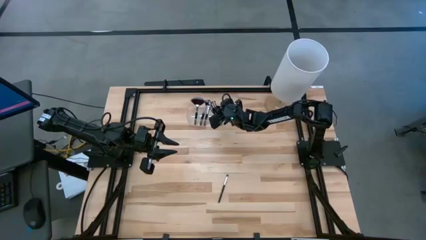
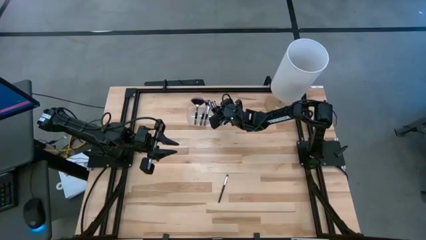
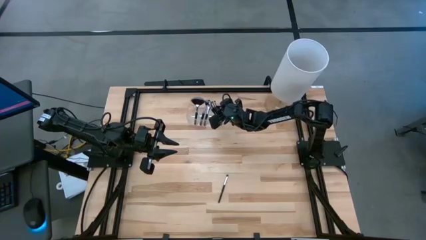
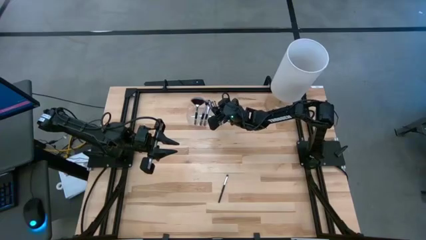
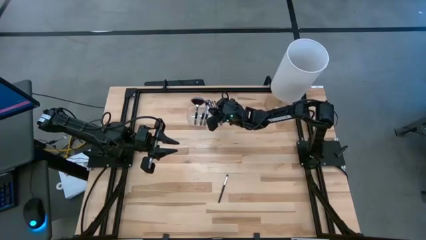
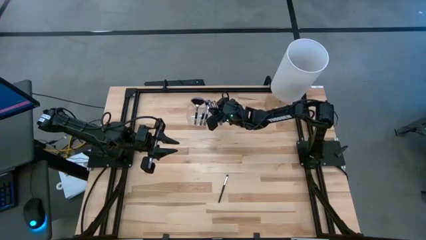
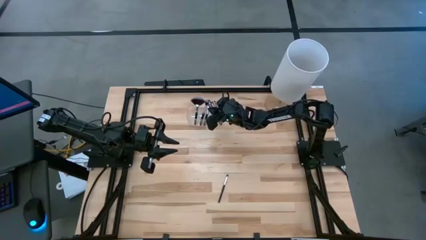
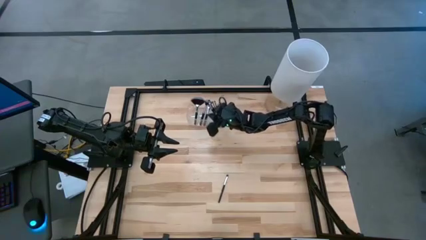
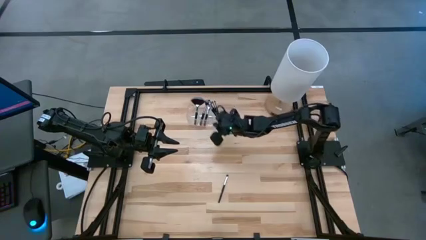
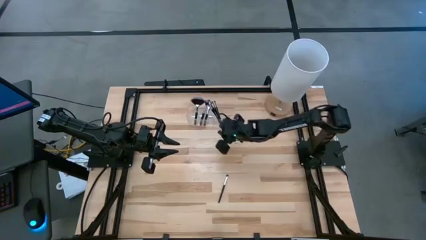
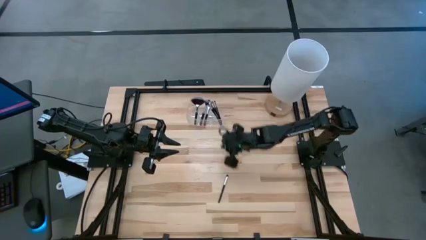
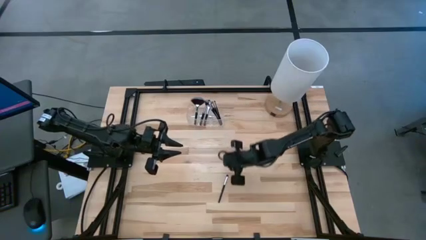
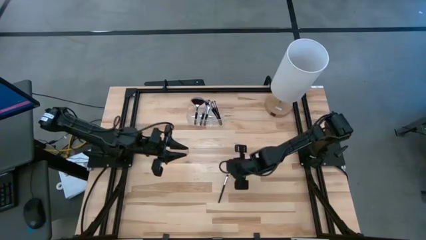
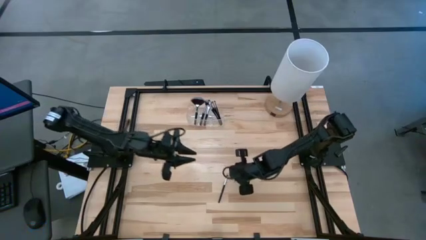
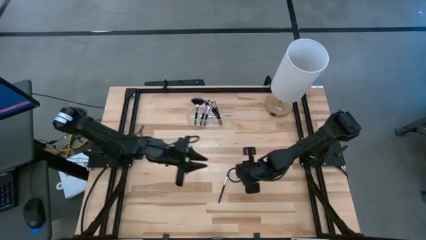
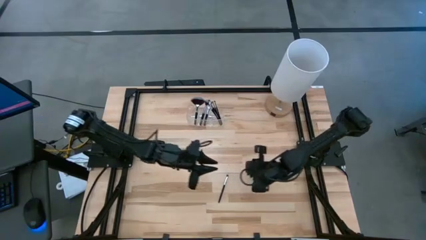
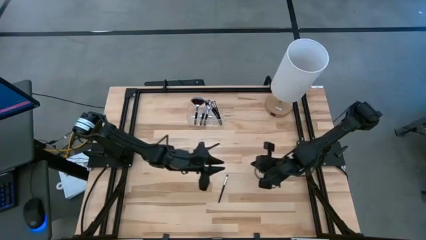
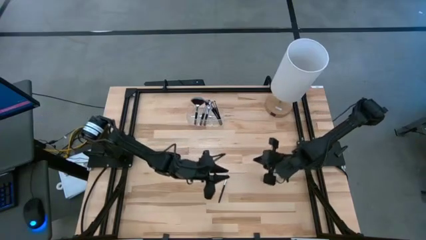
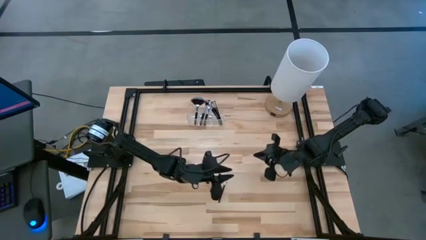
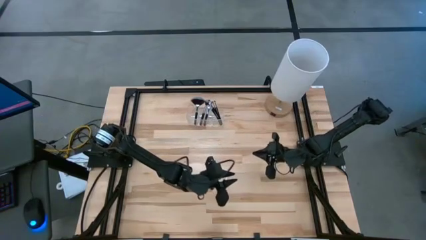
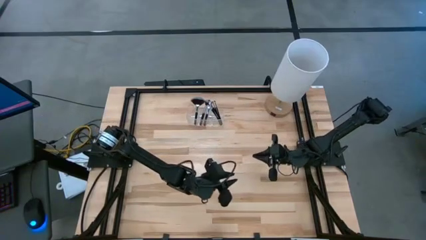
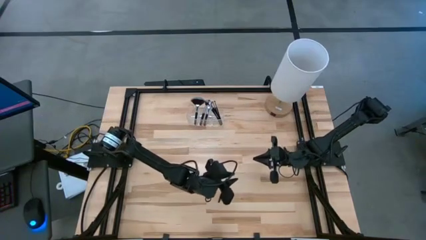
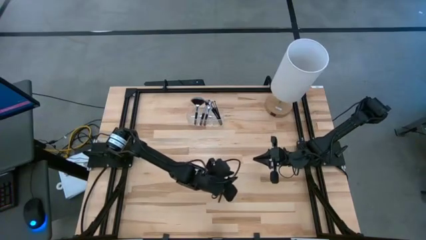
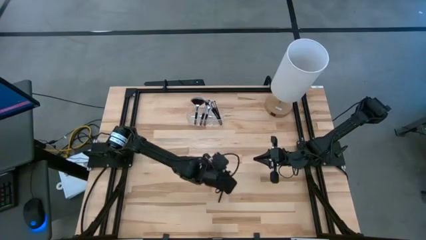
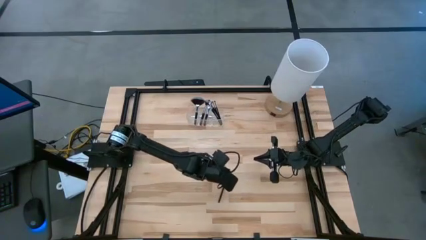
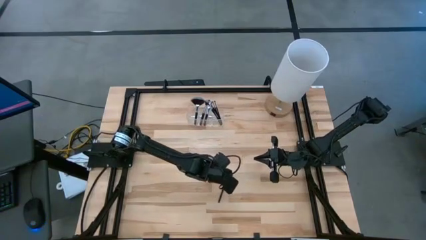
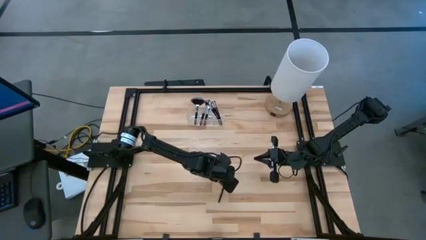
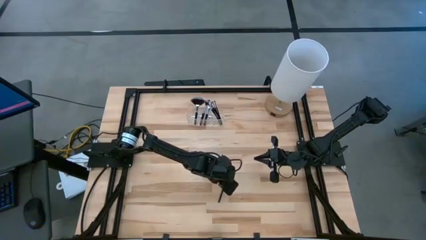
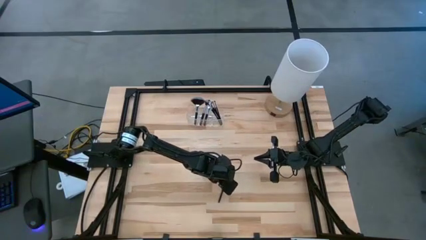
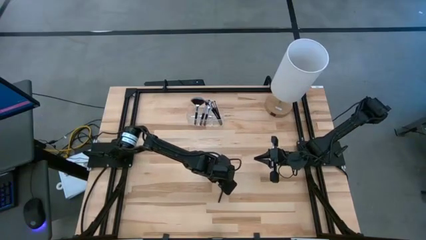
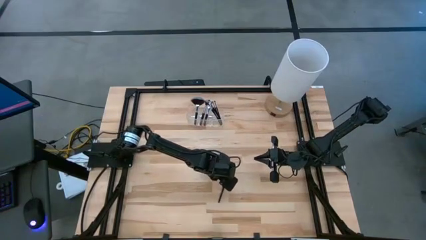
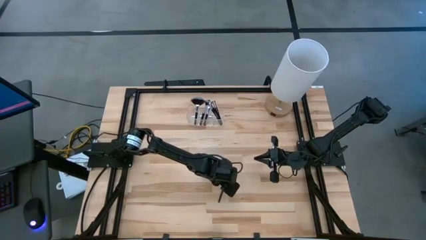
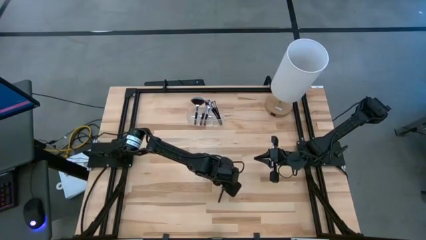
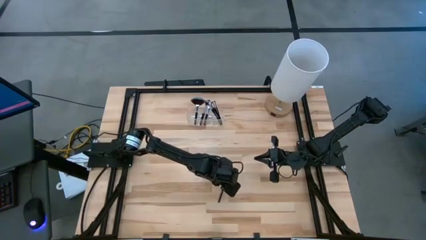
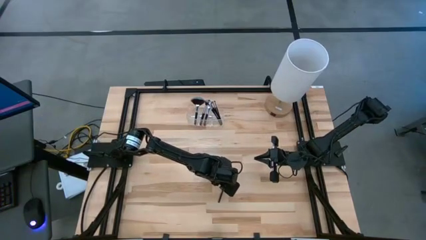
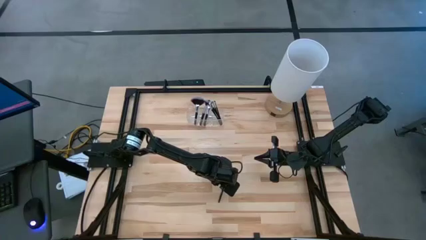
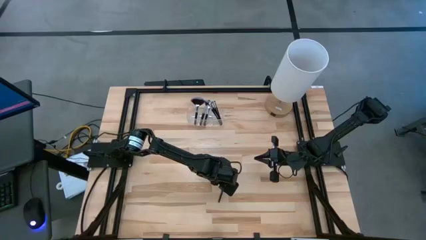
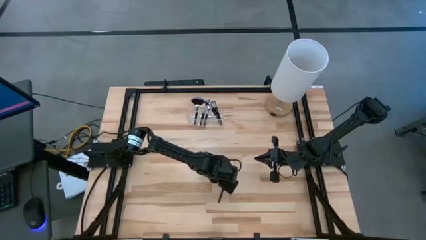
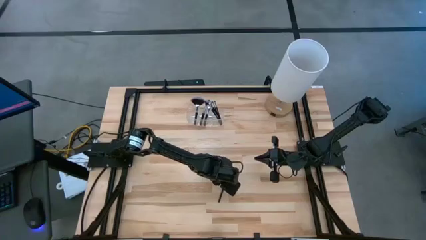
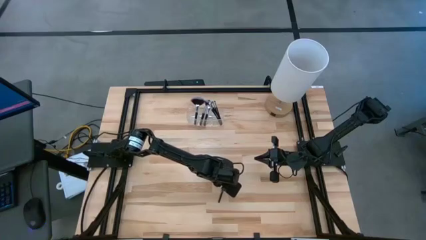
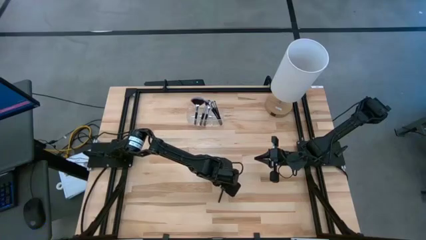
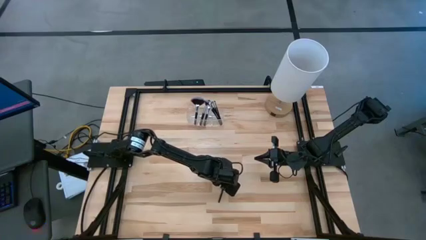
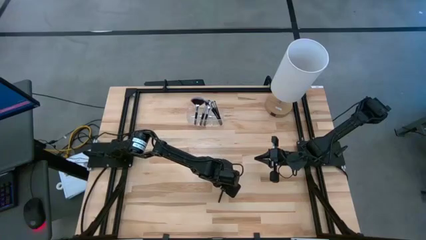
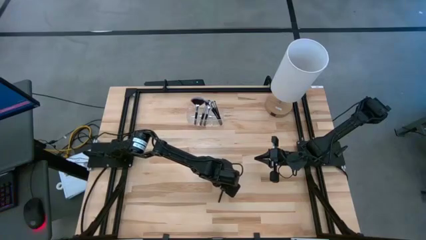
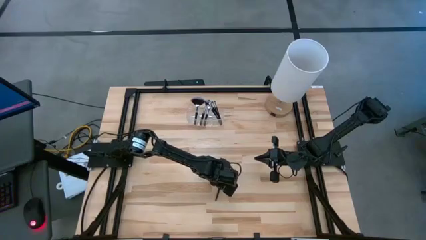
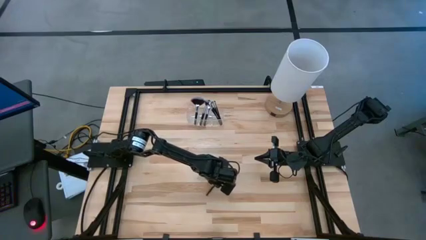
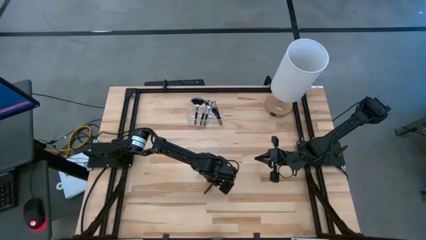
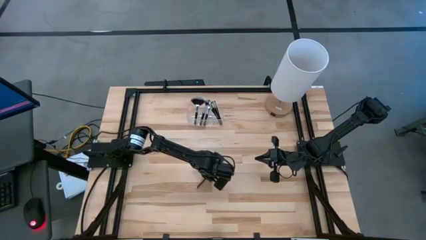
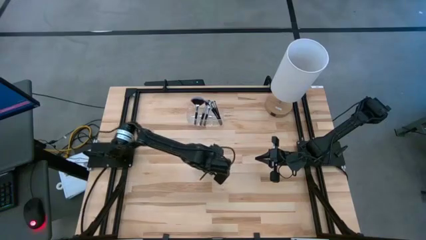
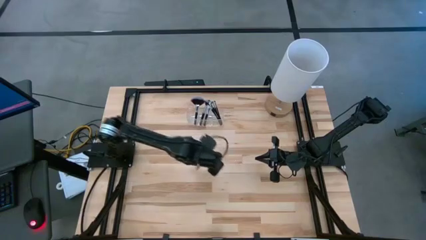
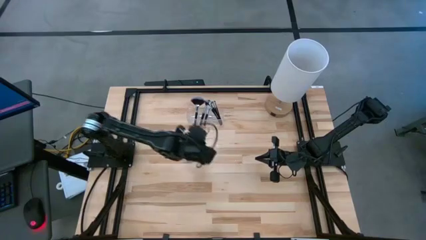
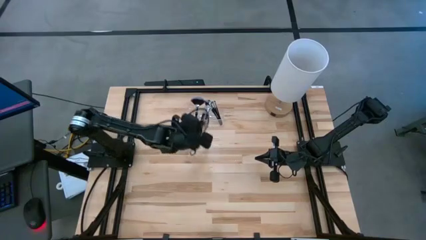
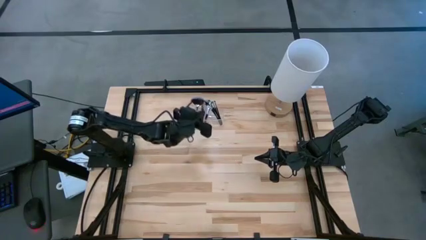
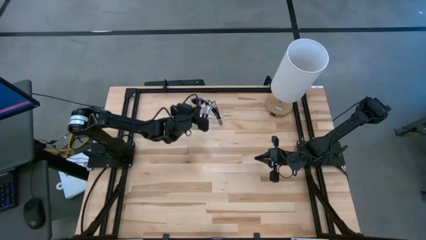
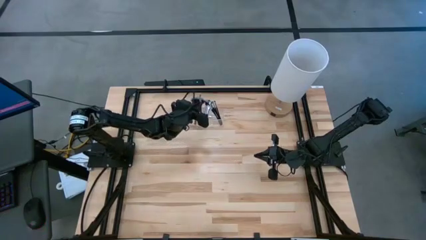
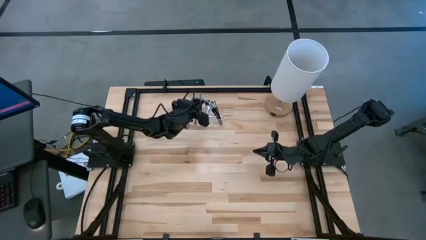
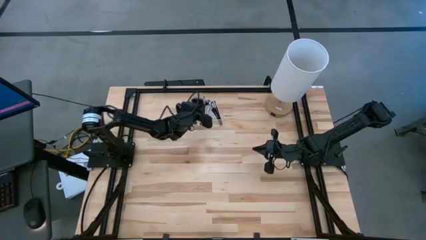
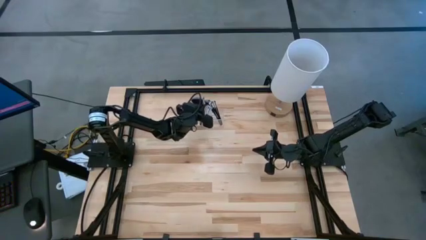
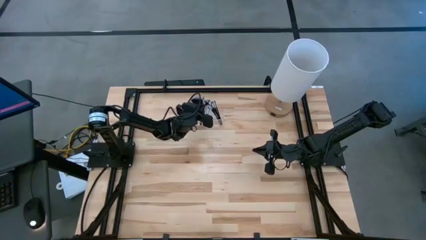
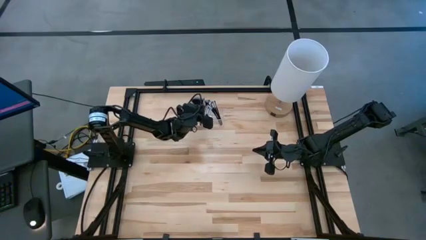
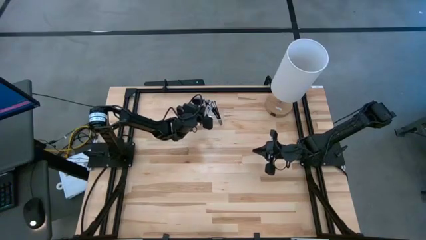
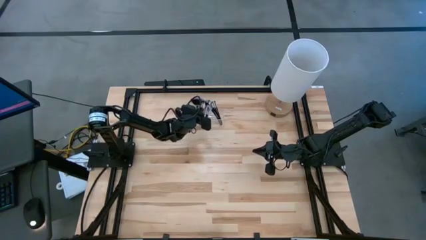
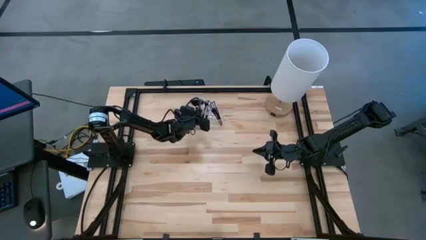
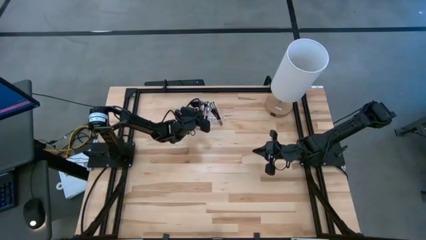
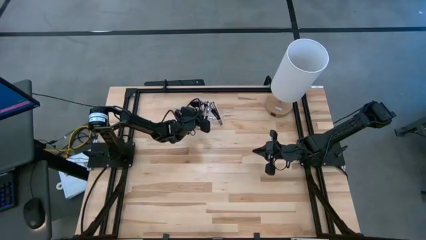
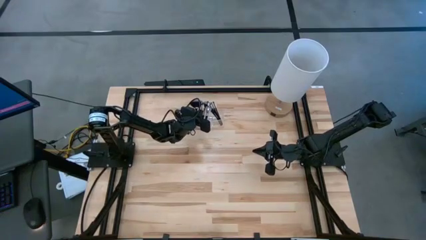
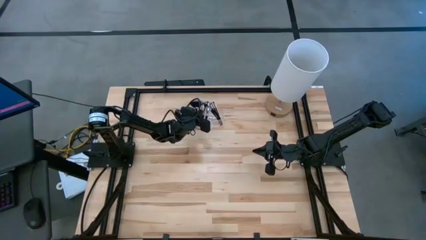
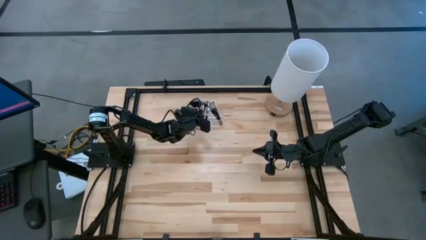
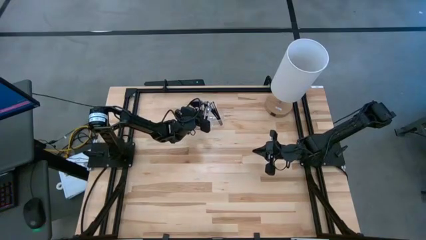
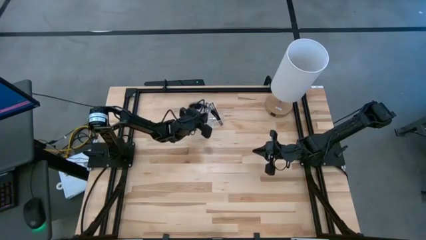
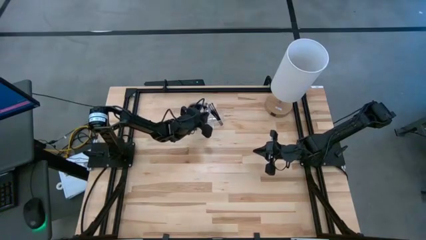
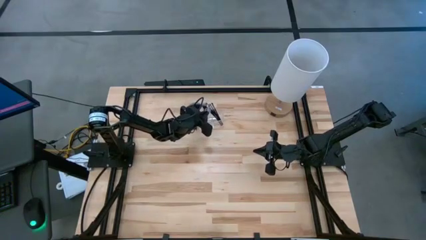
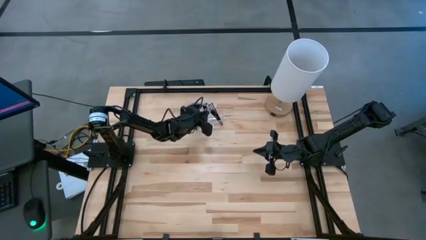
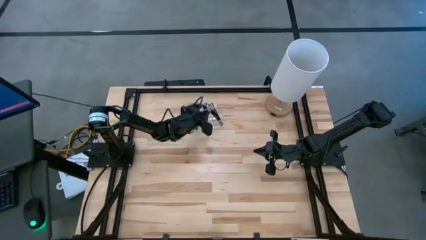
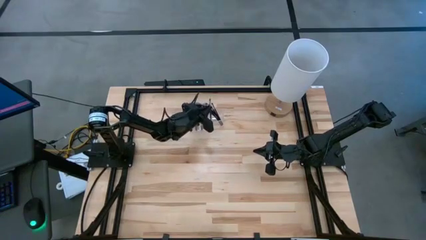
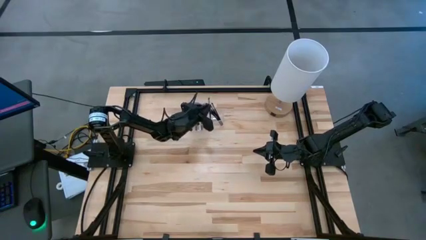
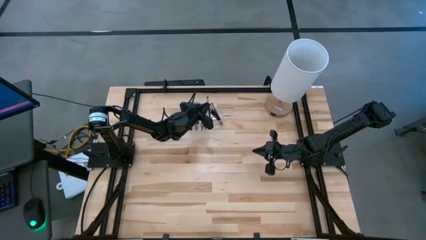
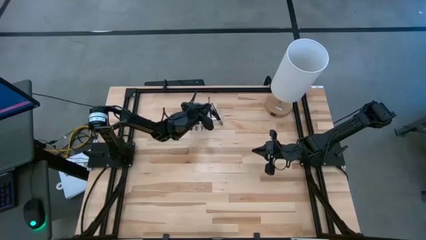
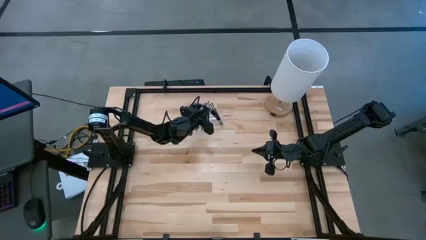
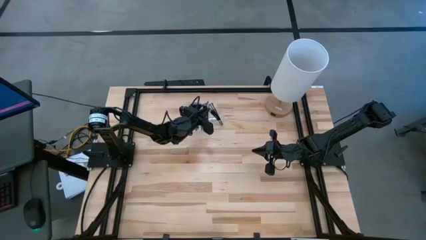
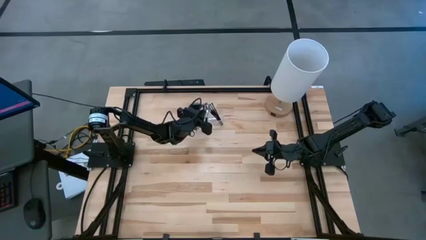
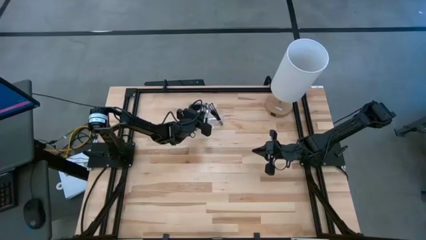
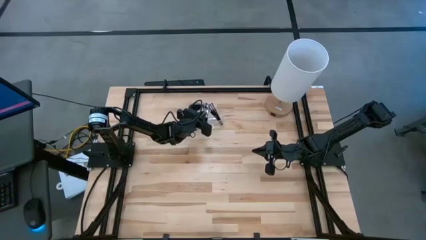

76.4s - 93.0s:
Task: Pick & Place Makeup Supplies
Put the makeup brush into the transparent organizer

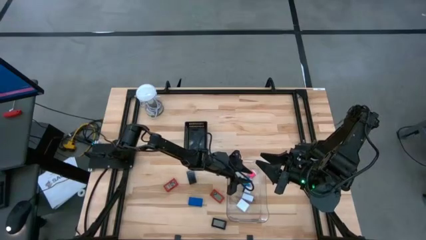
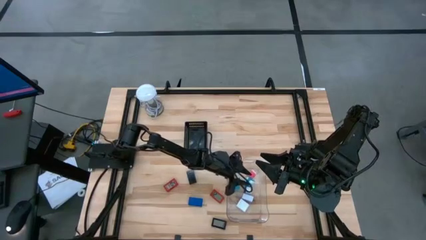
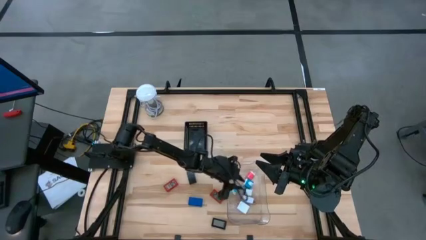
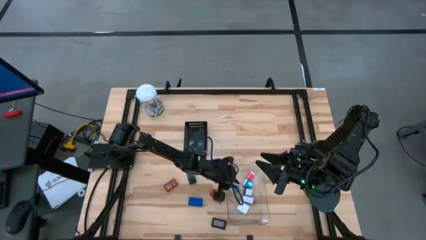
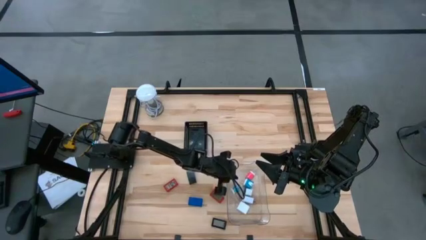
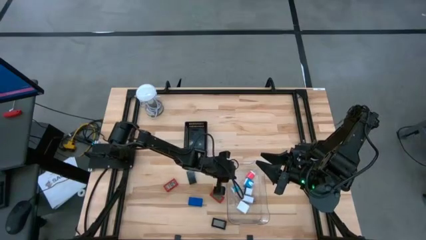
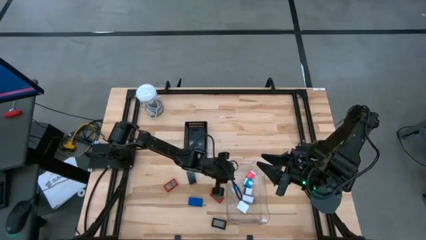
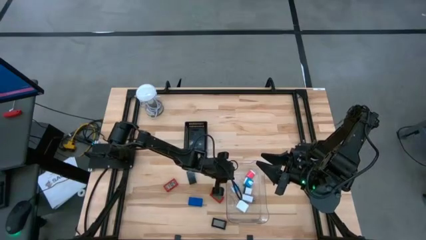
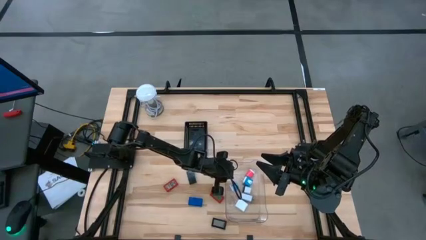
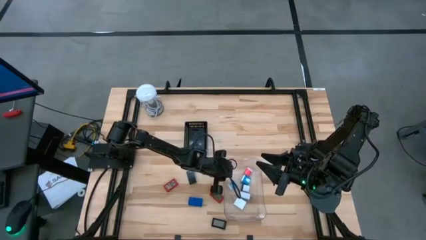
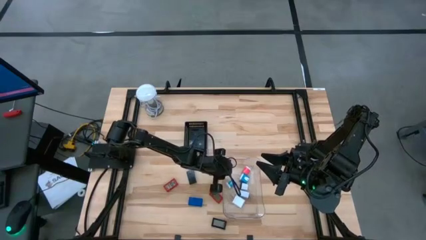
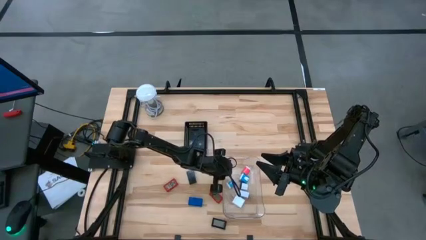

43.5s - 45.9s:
Task: Pick & Place Office items
Adjust the transparent bin
